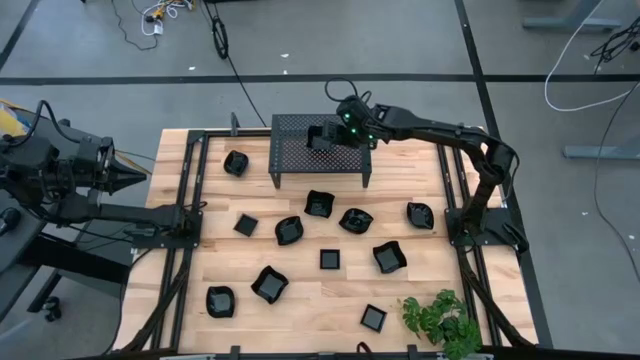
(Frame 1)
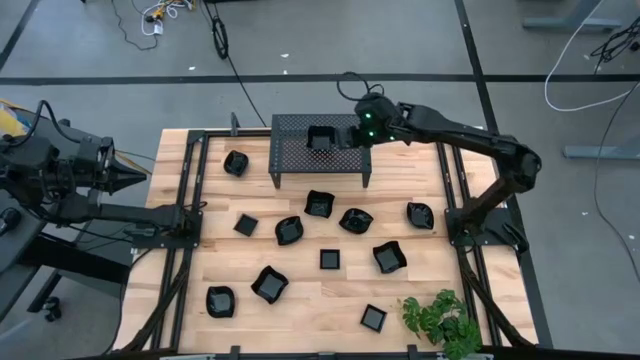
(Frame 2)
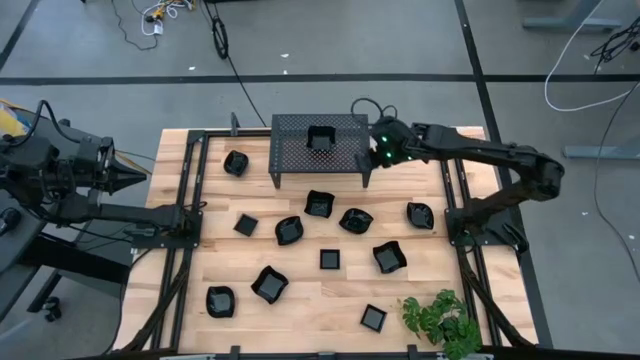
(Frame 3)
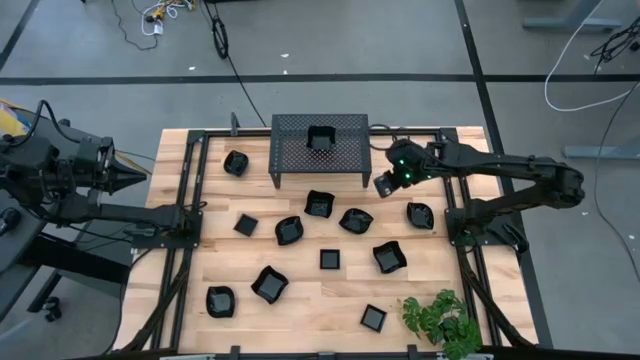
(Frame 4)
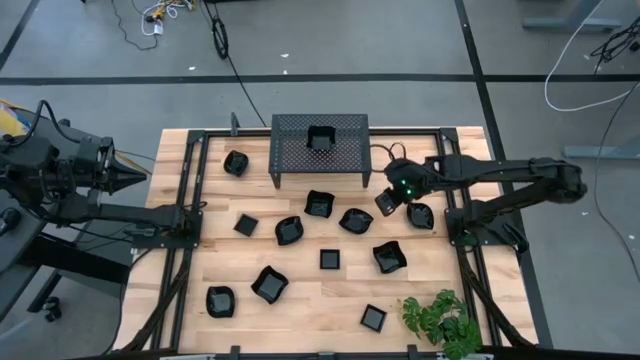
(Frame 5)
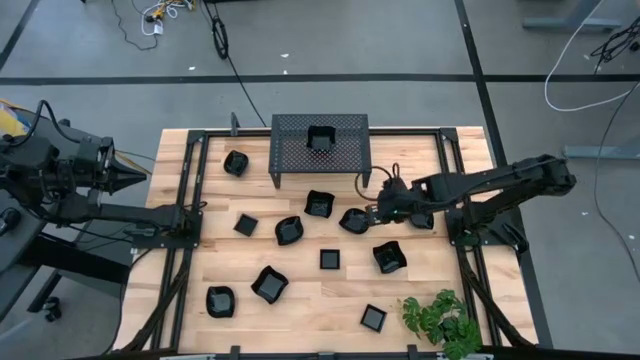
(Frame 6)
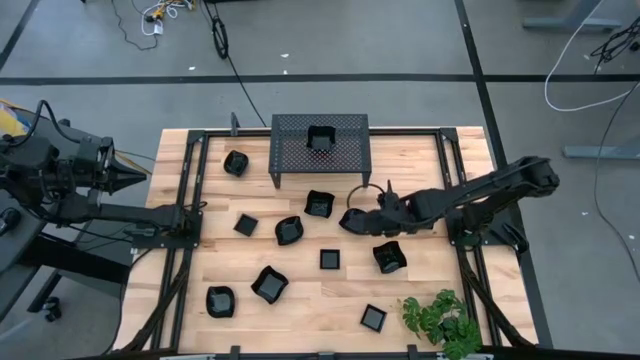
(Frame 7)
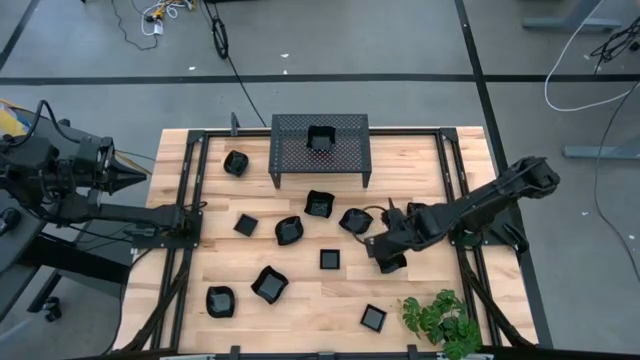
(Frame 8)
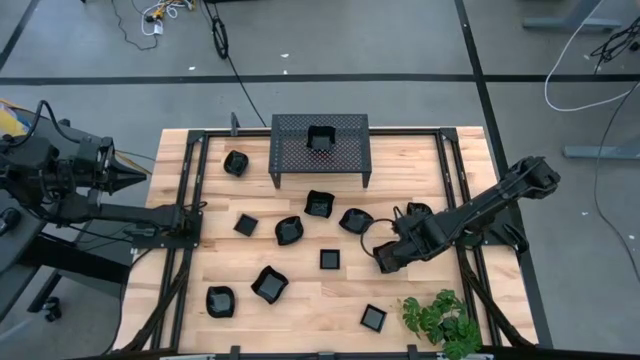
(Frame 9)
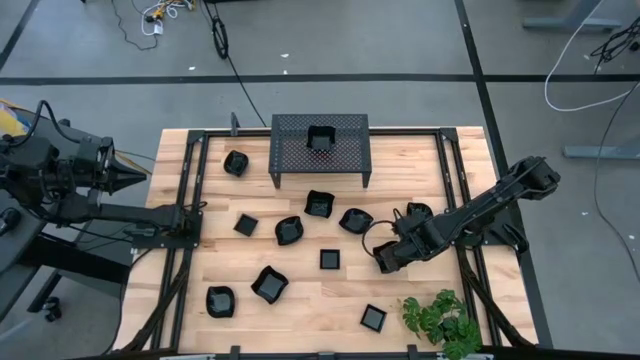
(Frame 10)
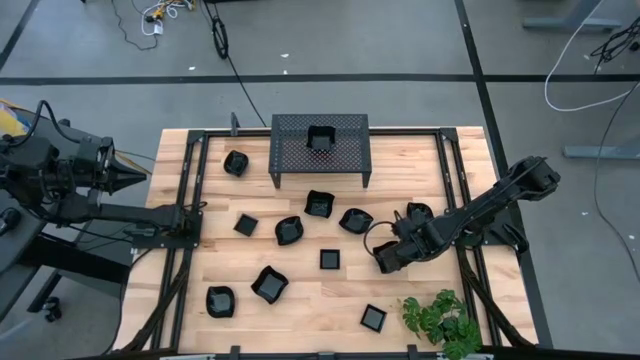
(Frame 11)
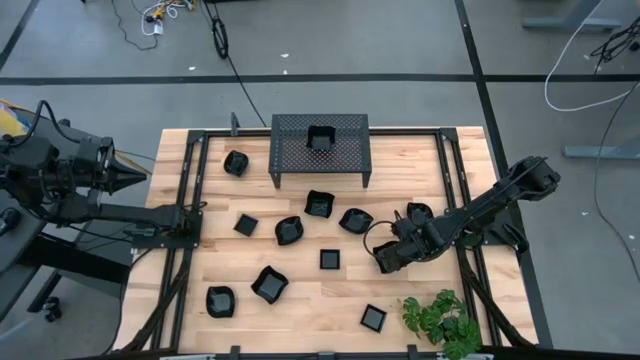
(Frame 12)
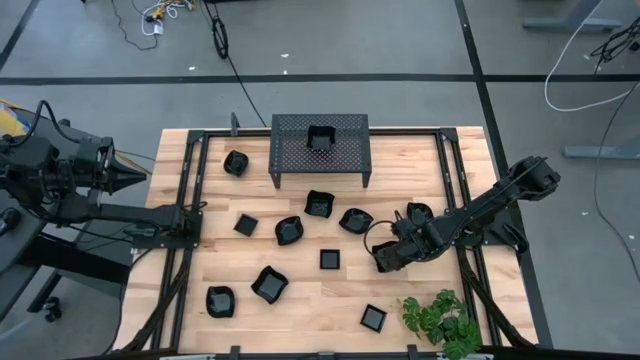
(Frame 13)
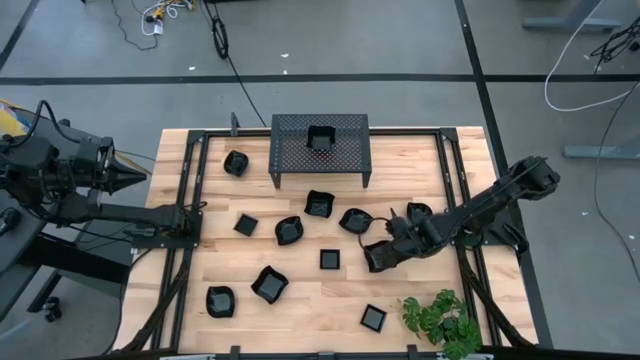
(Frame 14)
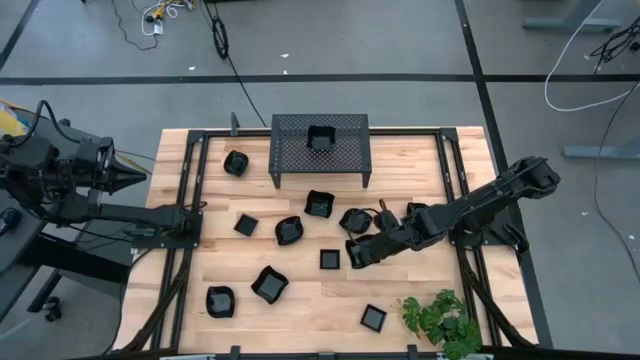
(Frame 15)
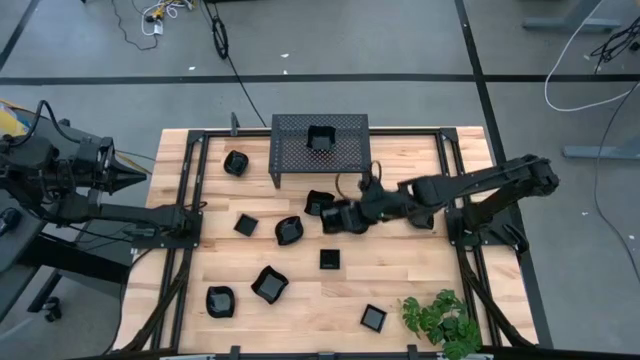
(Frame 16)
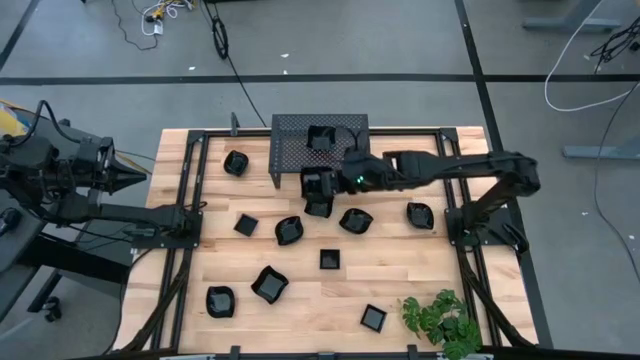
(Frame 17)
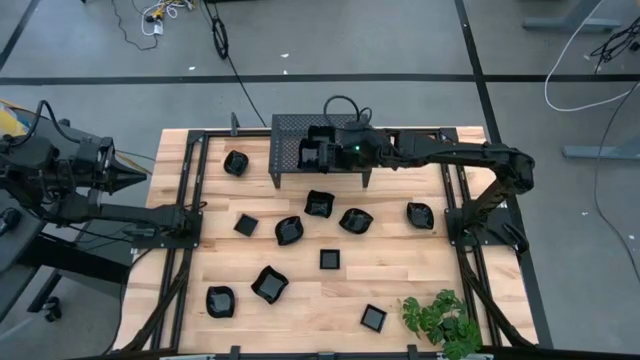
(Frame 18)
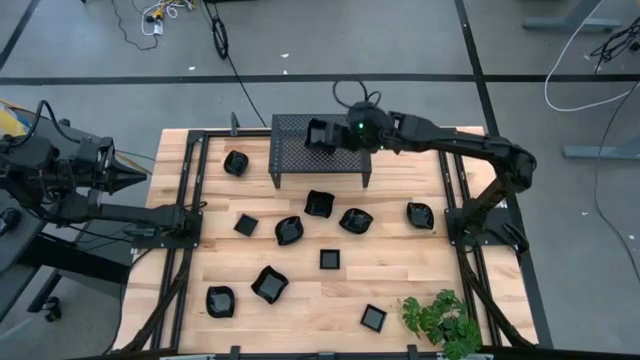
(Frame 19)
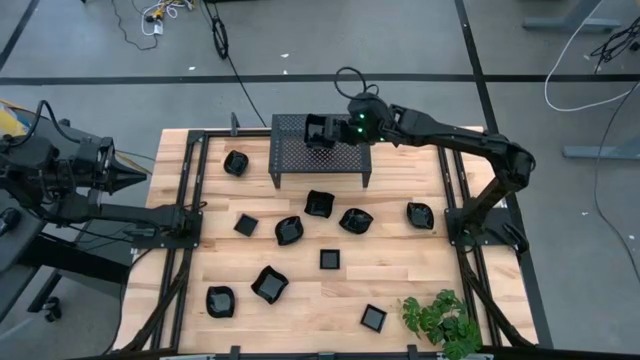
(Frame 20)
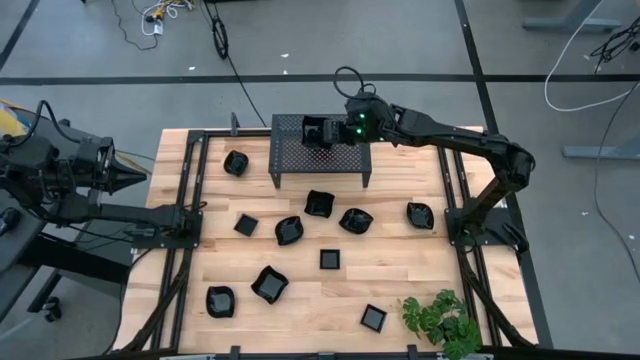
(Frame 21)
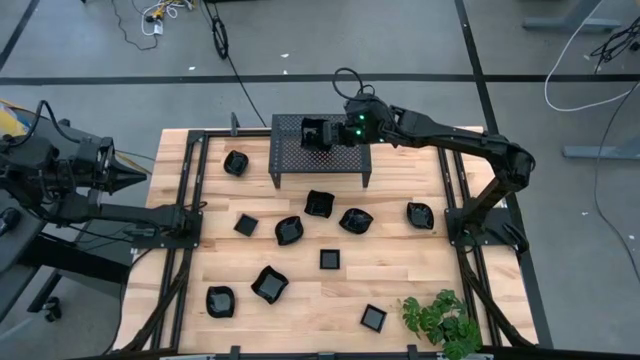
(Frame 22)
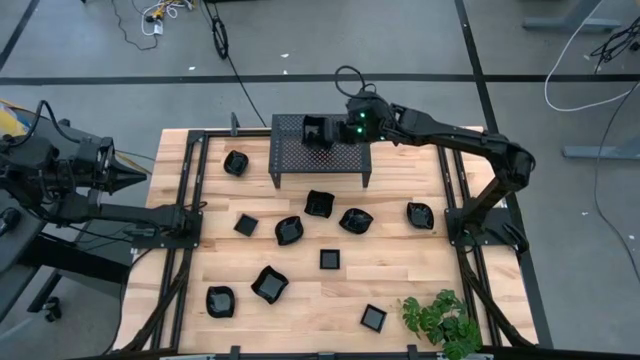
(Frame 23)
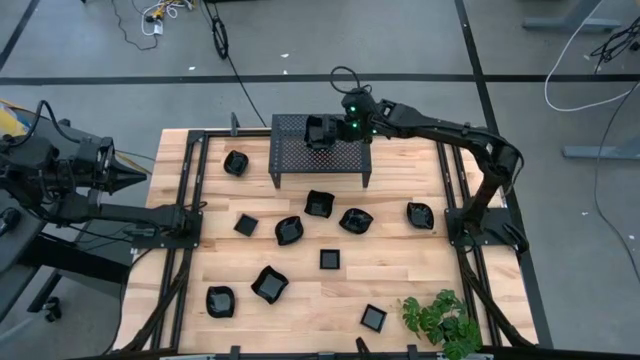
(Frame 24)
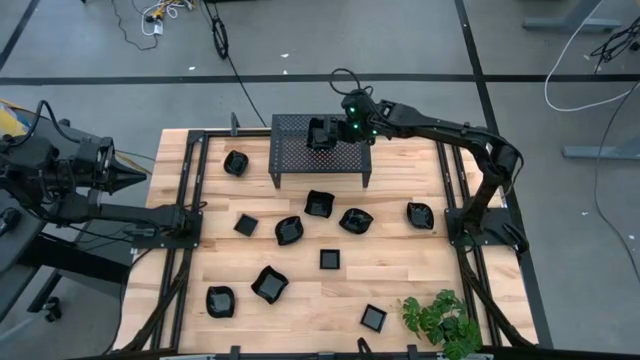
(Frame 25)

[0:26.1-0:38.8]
Task: Pick & Place Mini shaped plates
Stack the distorted square plate on top of the other distorted square plate on the shelf

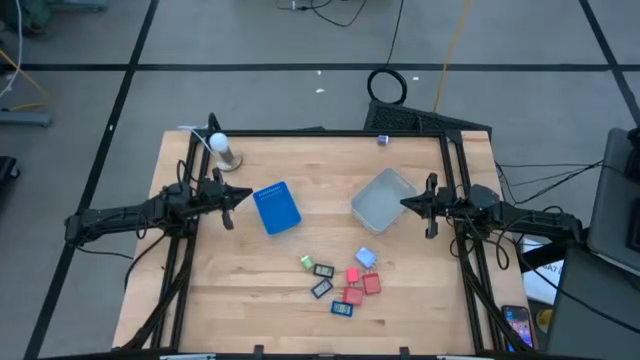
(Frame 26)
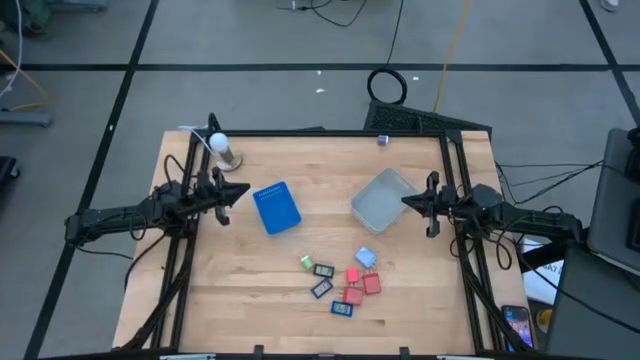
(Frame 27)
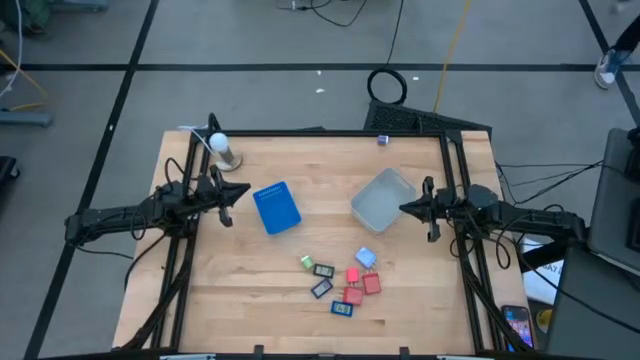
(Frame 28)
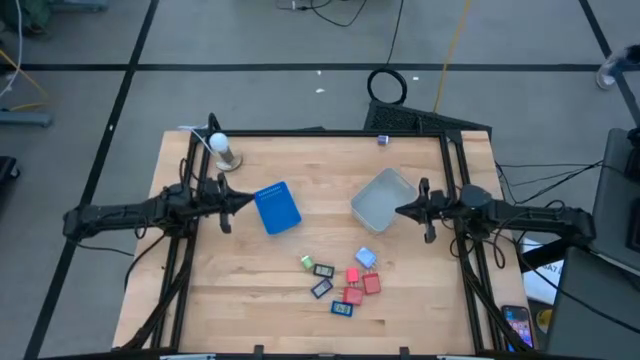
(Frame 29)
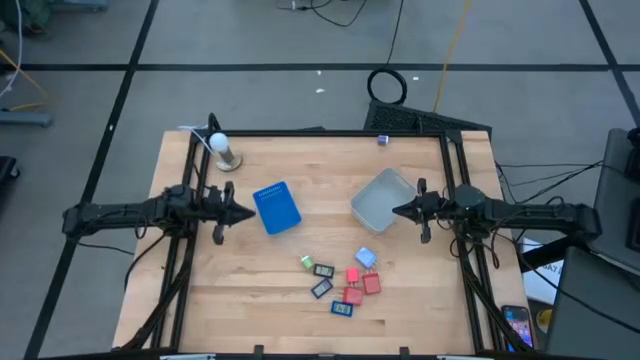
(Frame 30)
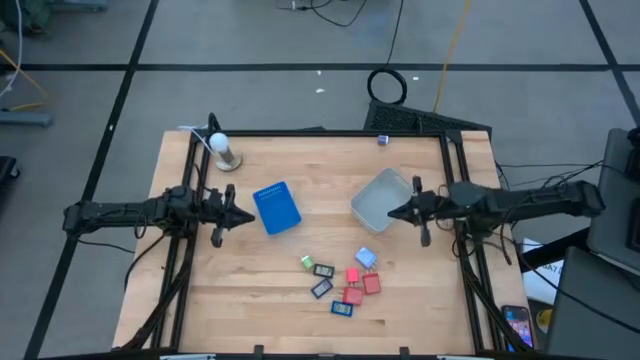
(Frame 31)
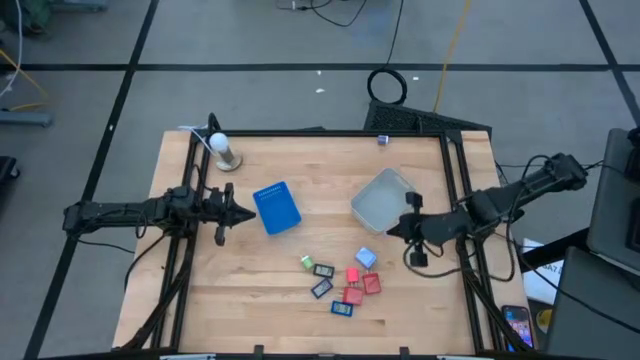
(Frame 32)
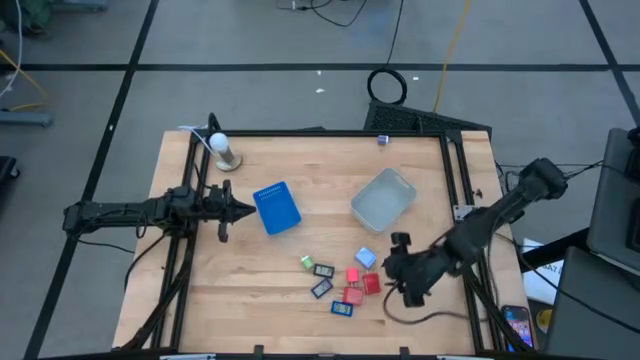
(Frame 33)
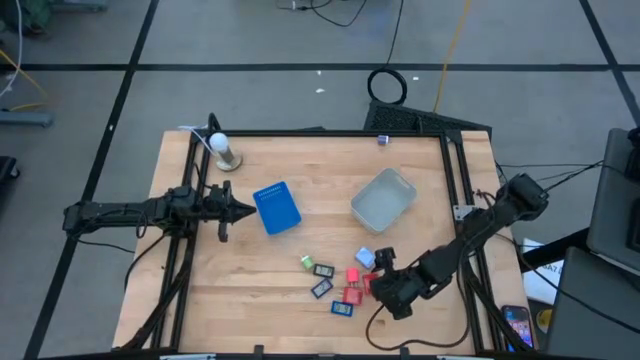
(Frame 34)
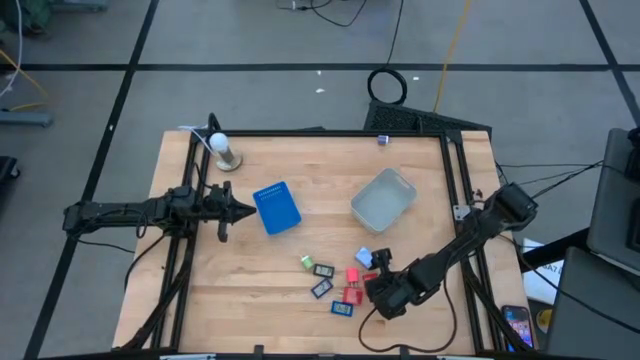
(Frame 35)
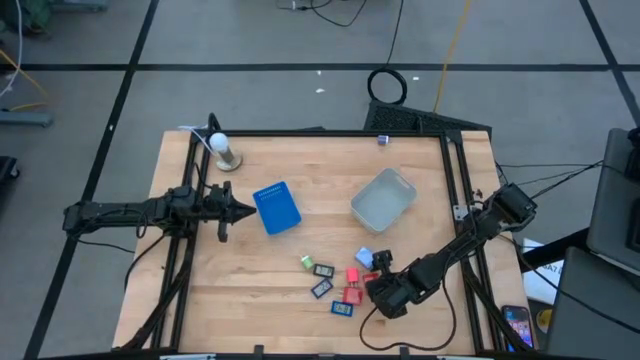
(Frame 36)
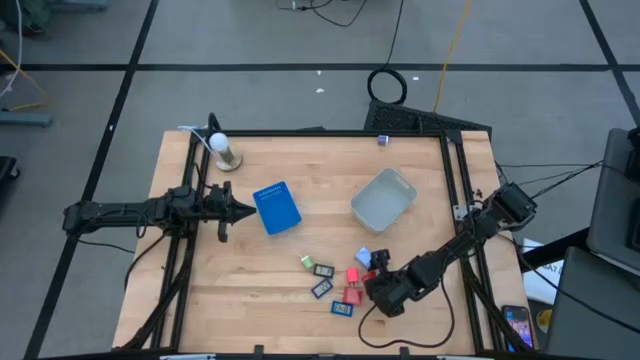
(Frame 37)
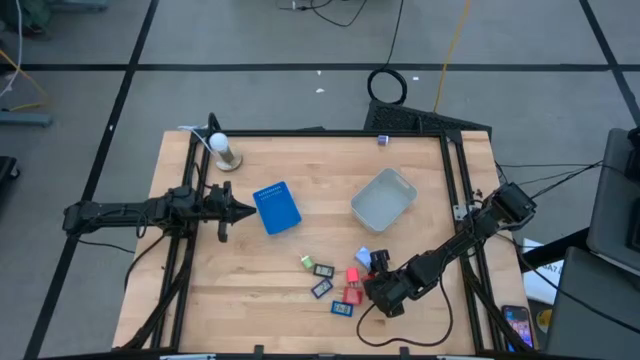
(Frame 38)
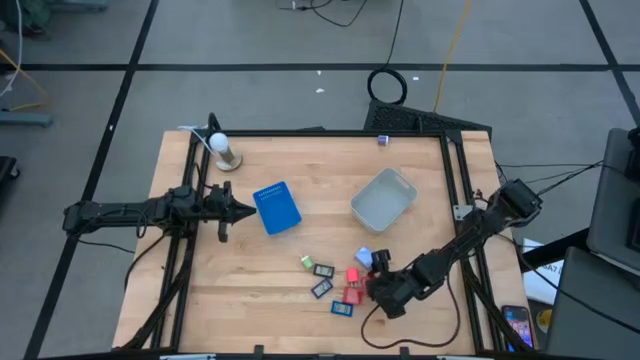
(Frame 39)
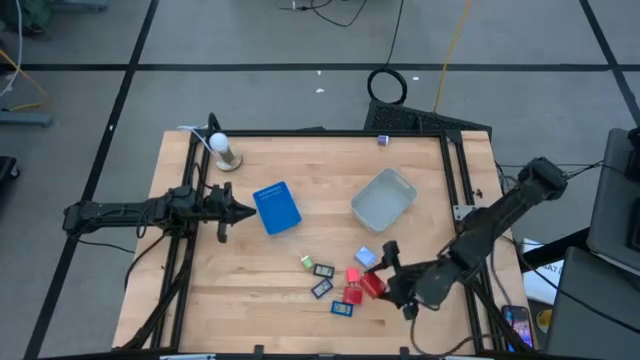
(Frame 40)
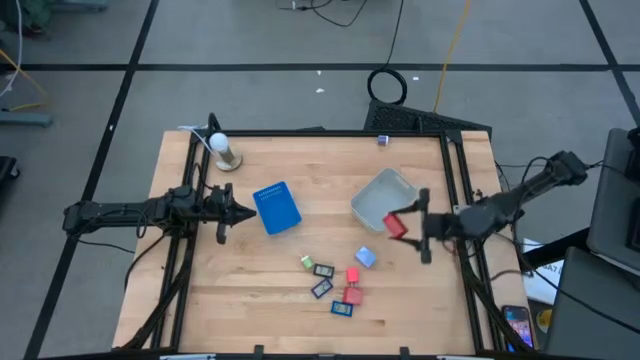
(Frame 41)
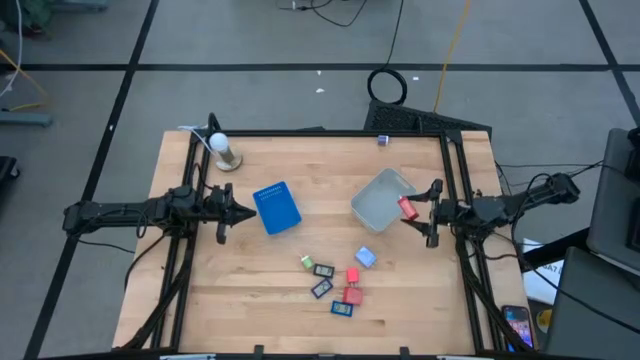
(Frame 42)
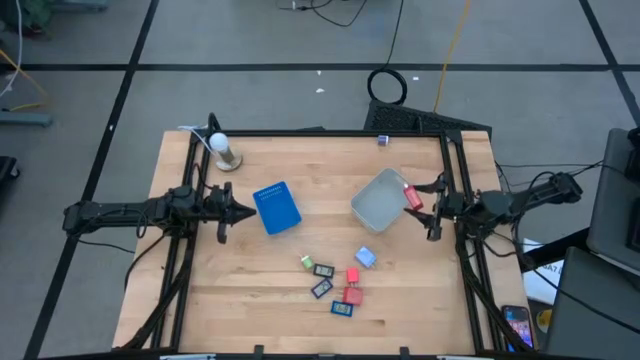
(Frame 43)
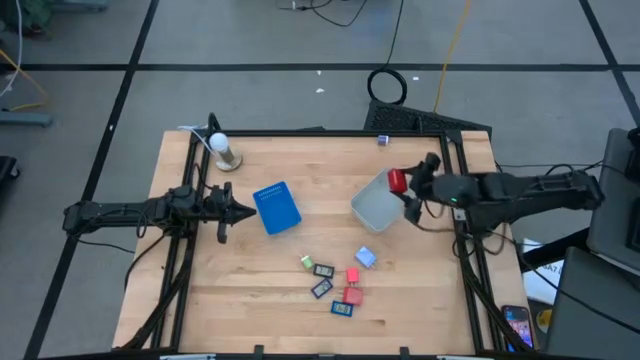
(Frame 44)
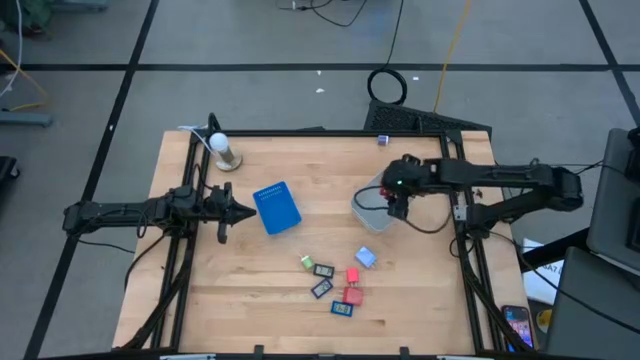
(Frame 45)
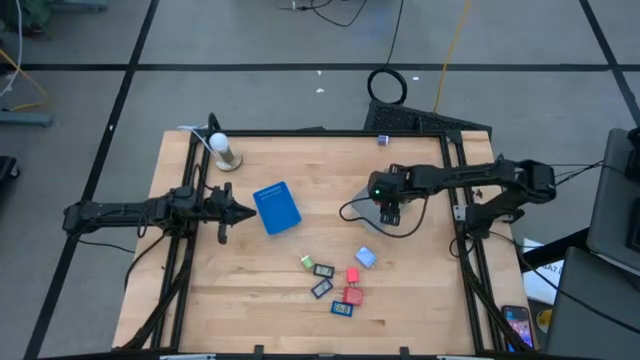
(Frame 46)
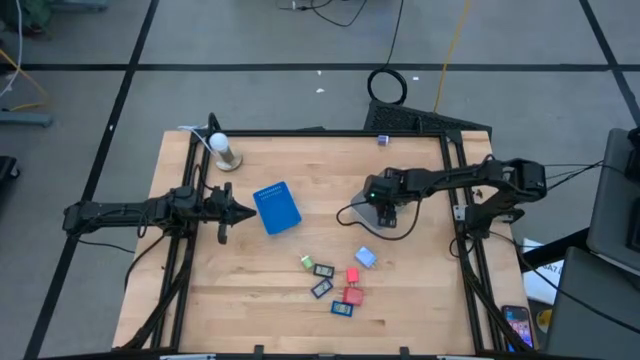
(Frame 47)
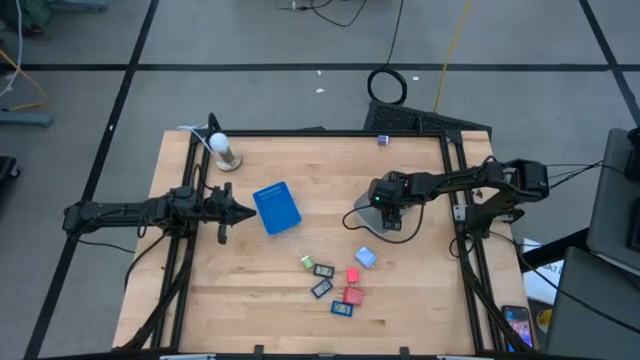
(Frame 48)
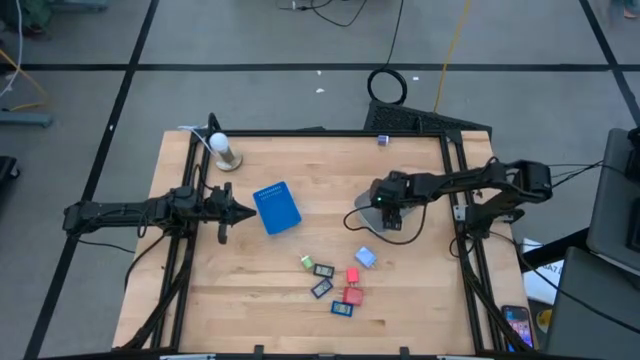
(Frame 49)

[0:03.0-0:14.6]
Task: Pick & Place Office items
Put the top red charger adapter into the grey bin
